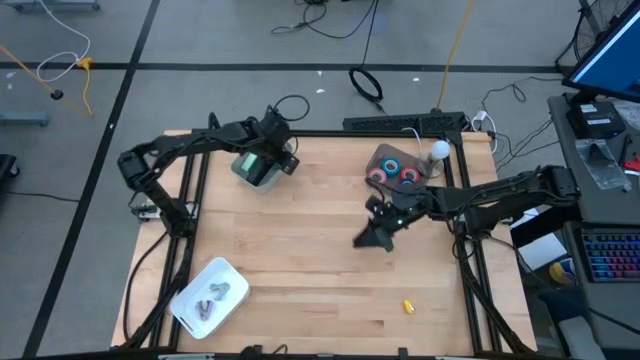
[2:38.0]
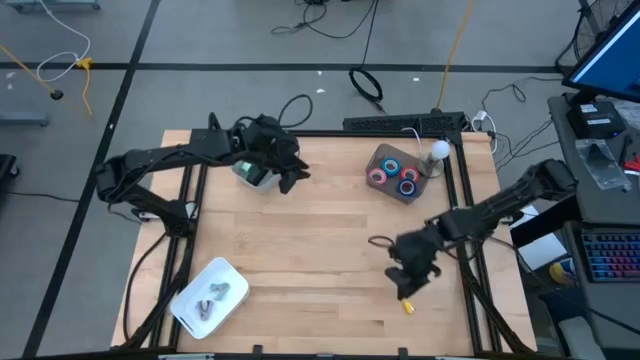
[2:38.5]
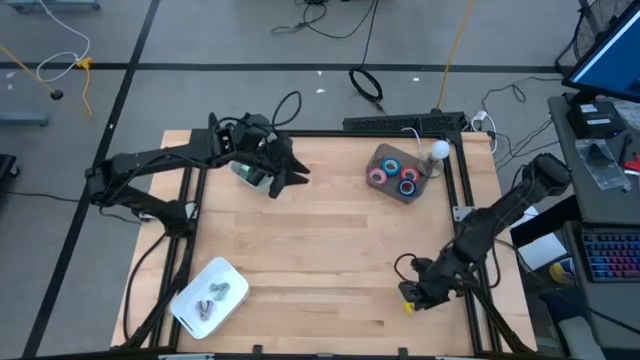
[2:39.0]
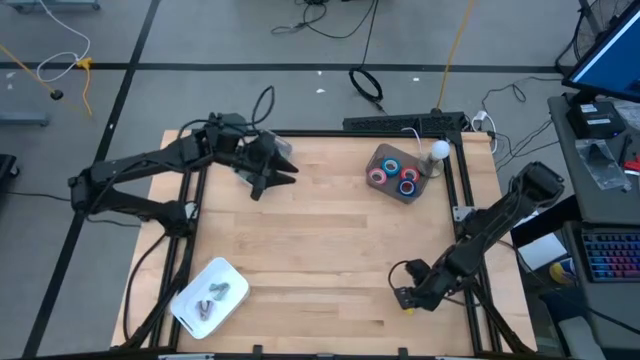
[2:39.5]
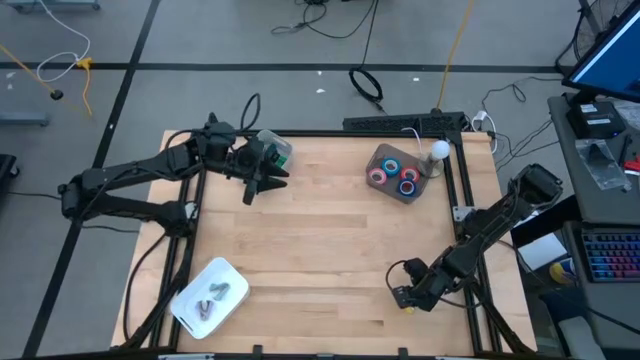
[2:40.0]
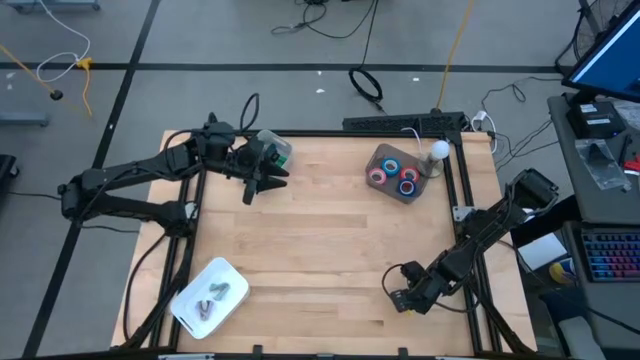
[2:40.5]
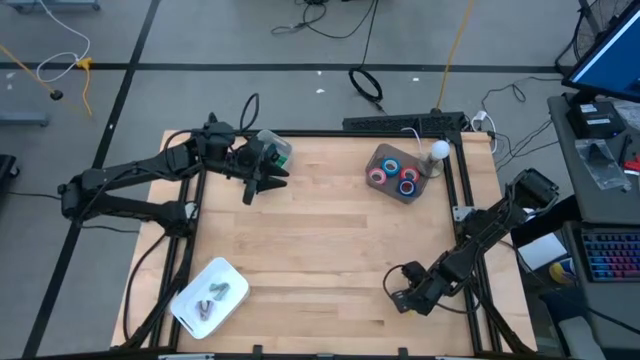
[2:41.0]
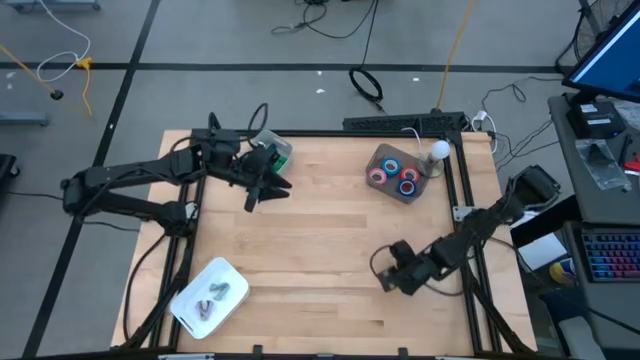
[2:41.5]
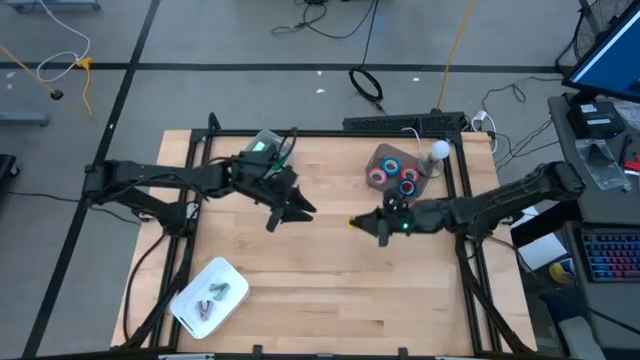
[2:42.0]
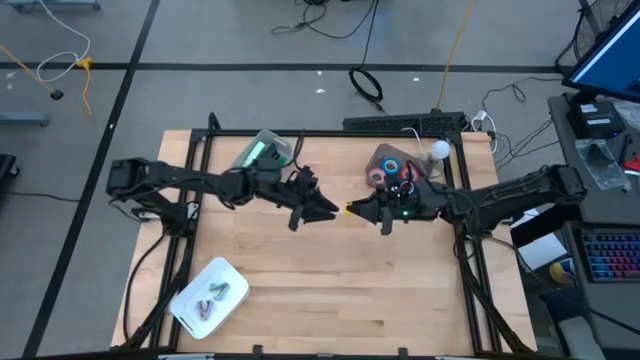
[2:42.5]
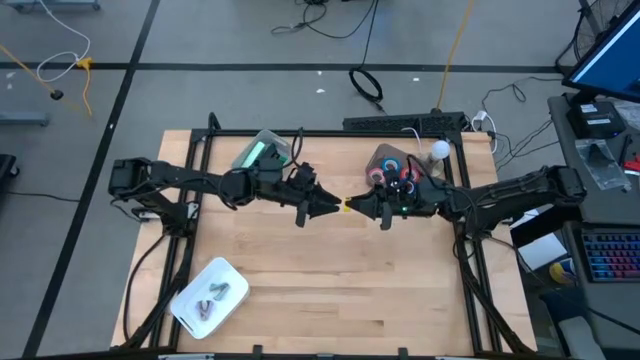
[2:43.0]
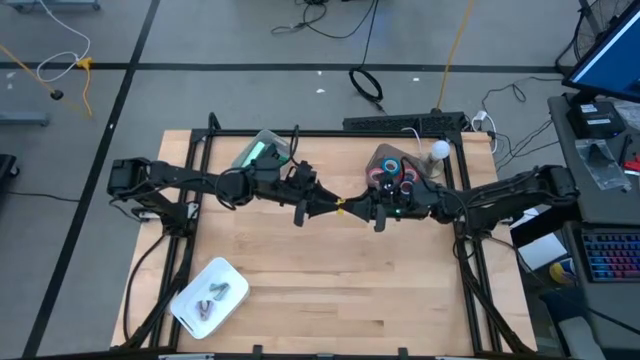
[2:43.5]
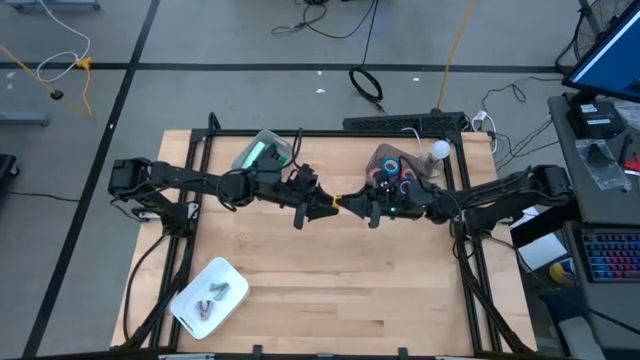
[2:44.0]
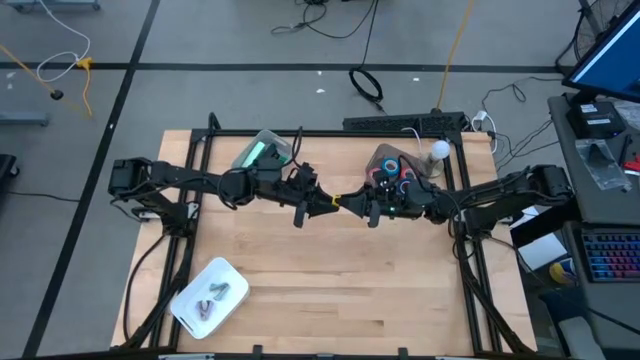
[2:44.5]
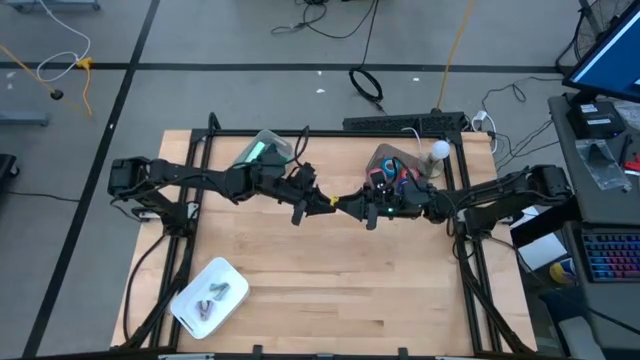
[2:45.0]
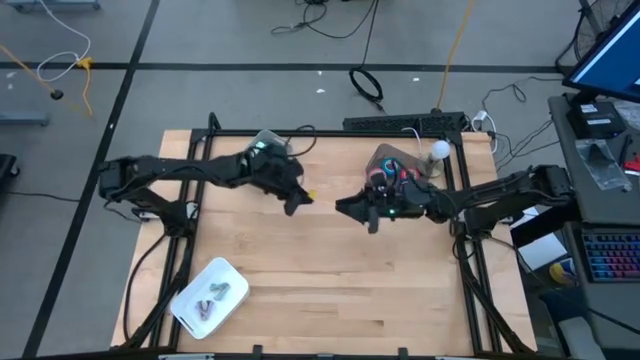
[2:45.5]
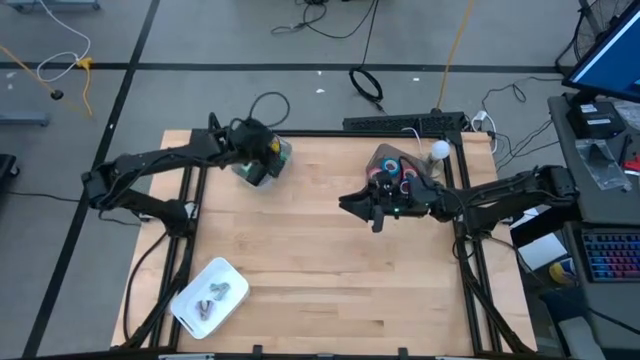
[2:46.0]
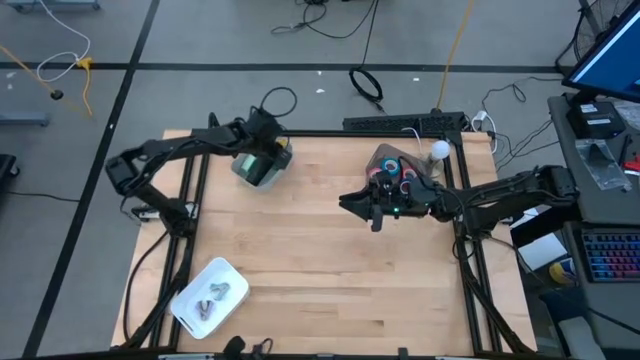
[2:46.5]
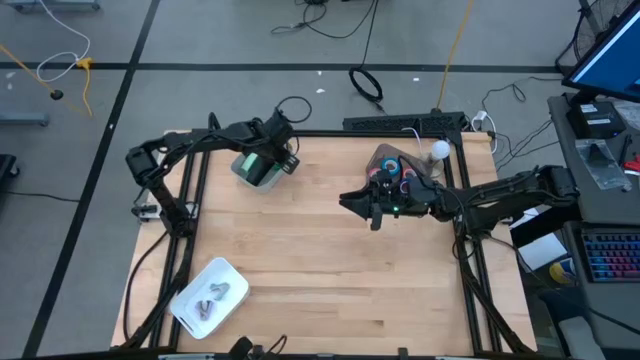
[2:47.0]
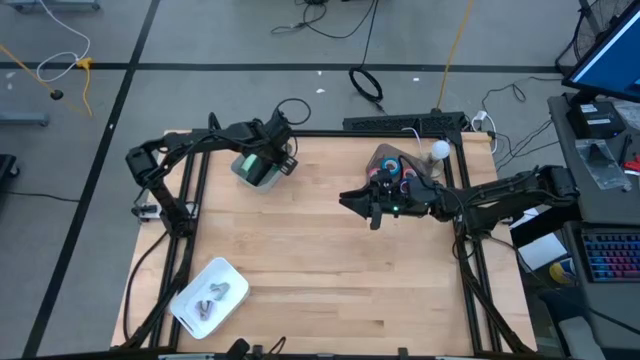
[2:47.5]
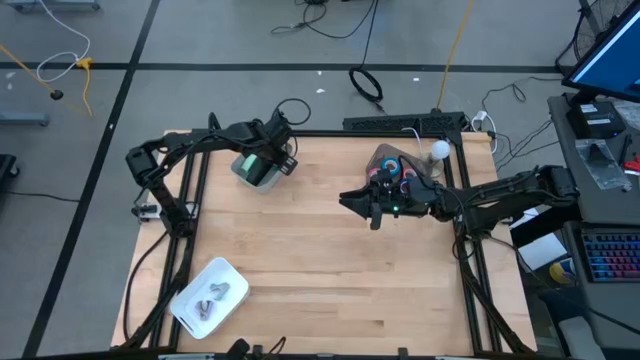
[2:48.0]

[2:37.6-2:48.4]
Task: Pick and place Stapler, Stapler remover, tape
Put the small yellow stapler into the gray bin

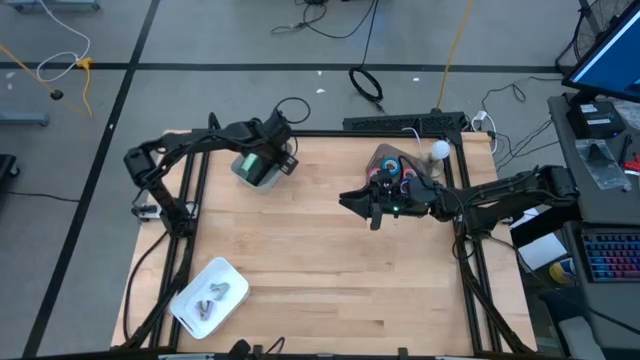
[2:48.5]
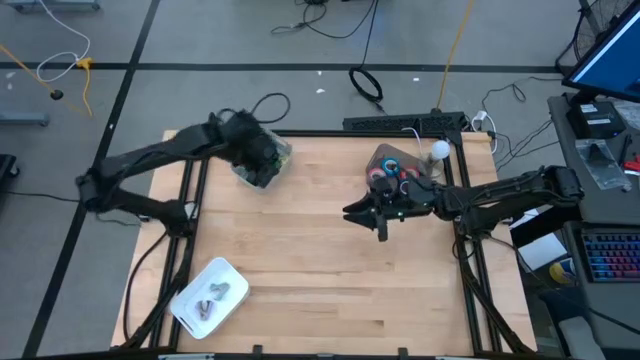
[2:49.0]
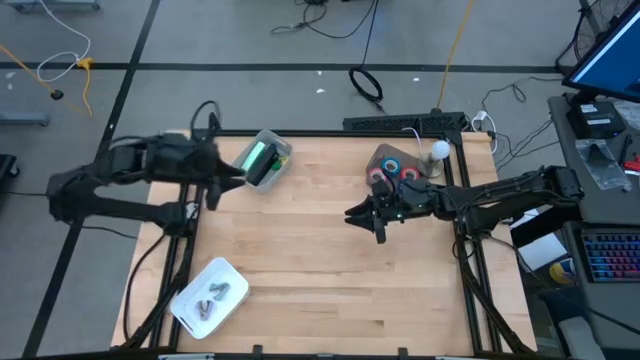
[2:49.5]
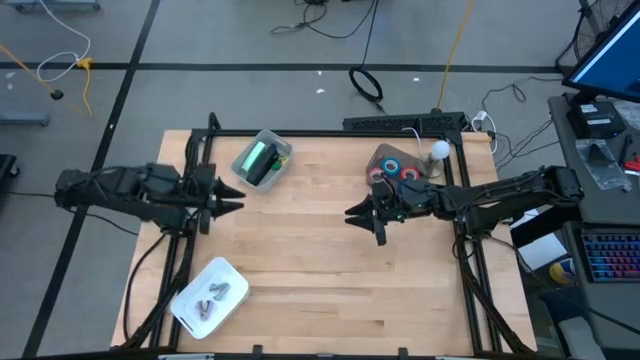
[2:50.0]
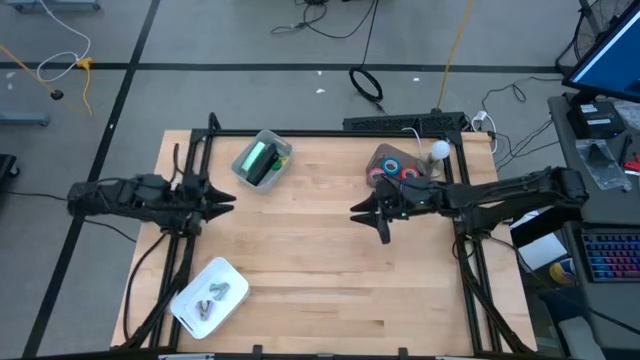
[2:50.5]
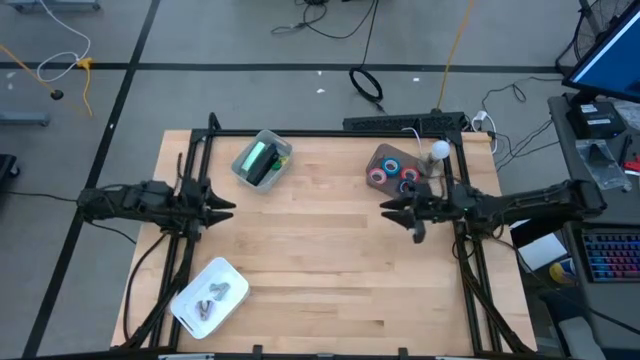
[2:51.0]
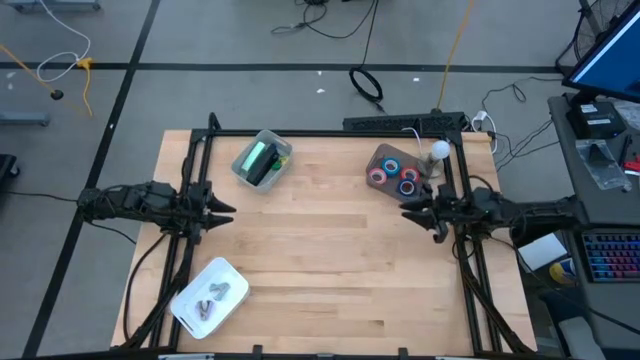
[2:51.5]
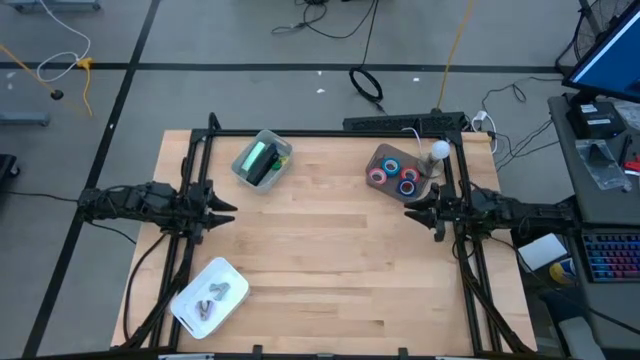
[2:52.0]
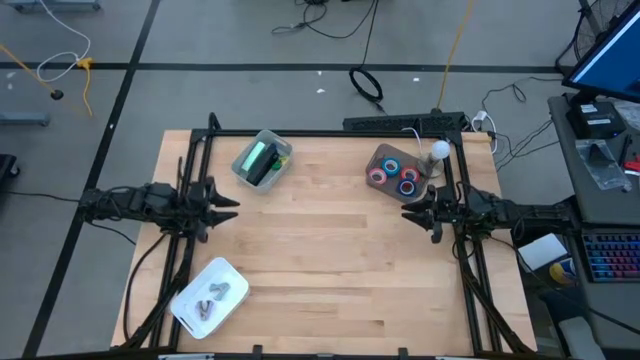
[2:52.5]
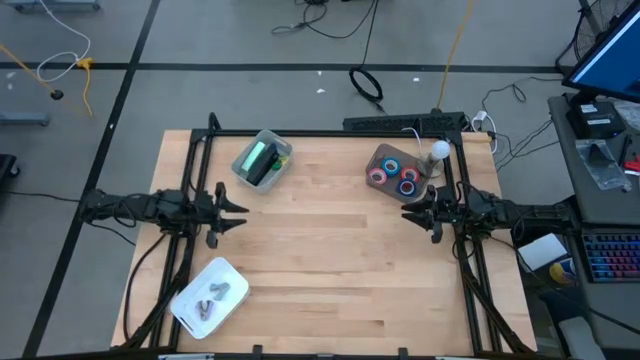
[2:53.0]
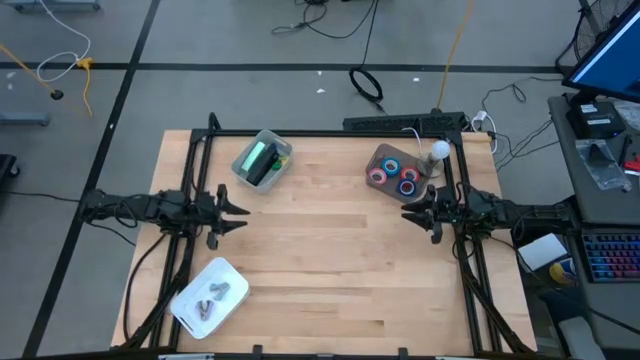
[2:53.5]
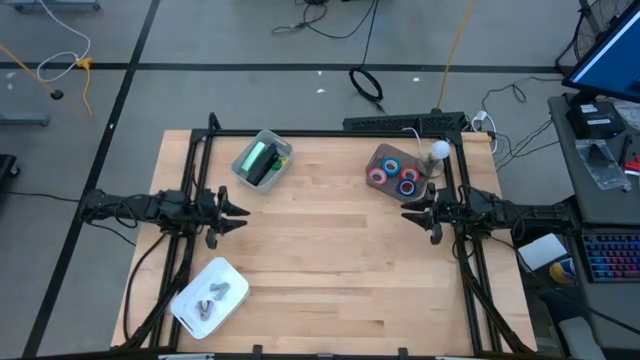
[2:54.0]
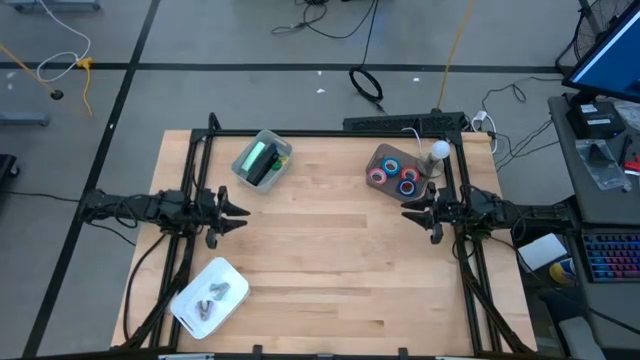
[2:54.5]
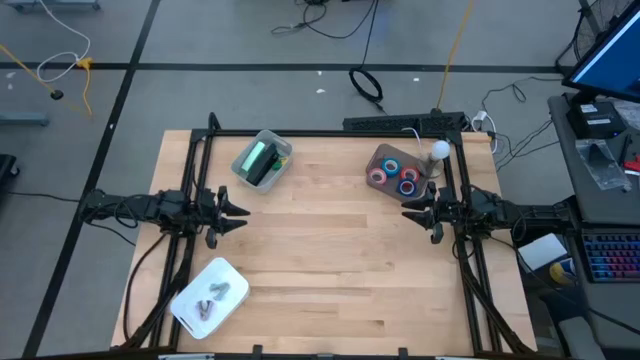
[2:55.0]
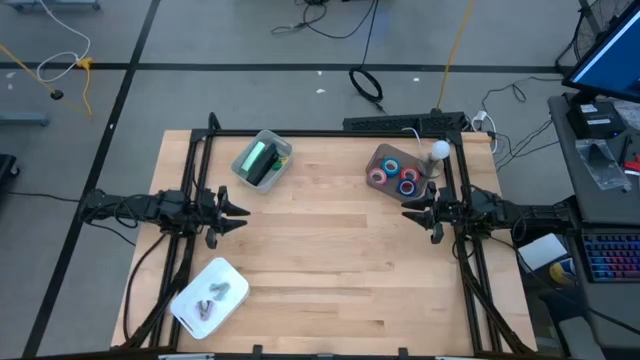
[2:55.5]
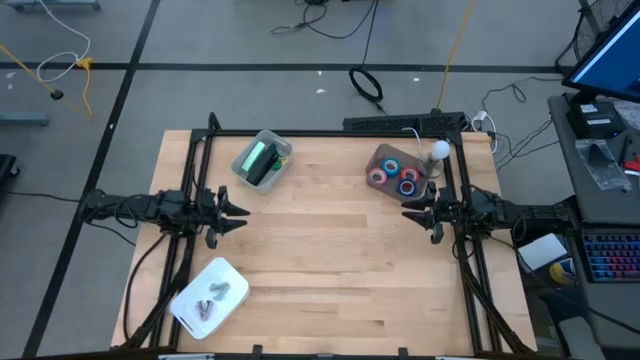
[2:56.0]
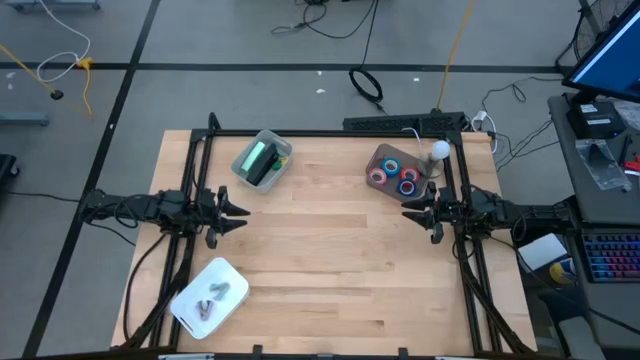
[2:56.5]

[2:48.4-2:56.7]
Return to Home Position
